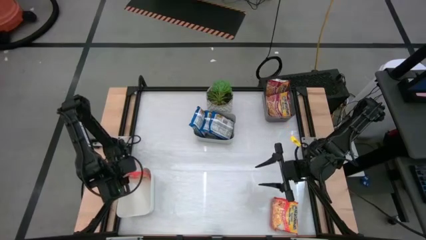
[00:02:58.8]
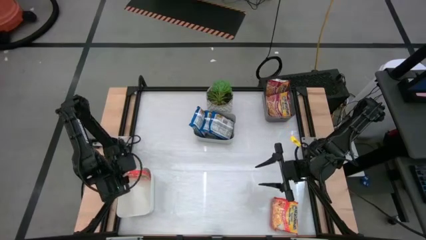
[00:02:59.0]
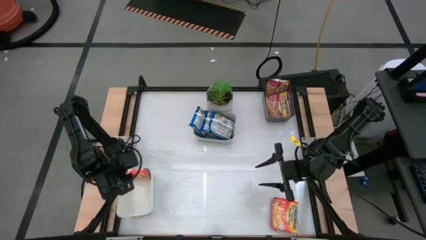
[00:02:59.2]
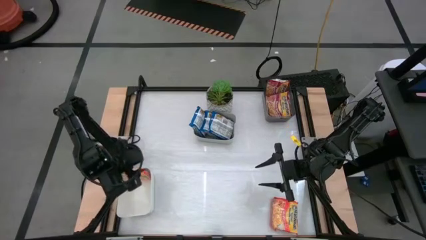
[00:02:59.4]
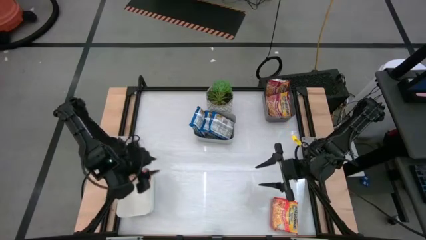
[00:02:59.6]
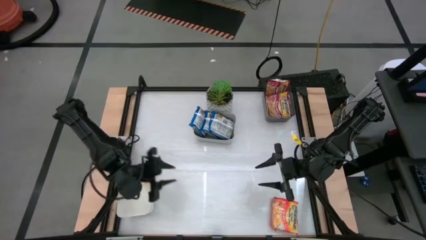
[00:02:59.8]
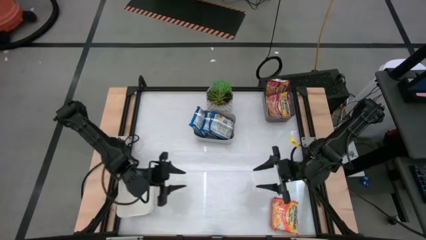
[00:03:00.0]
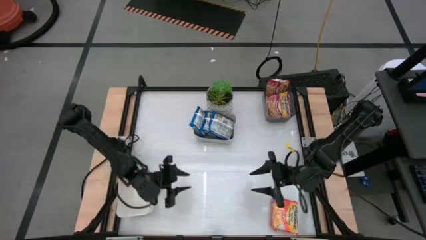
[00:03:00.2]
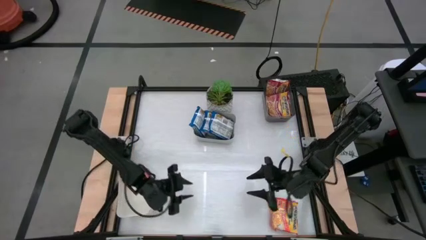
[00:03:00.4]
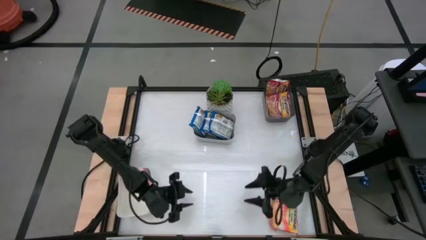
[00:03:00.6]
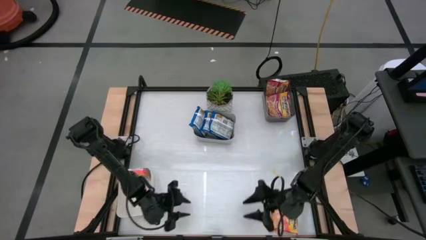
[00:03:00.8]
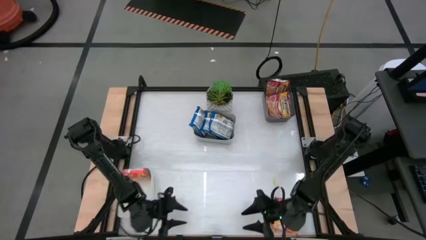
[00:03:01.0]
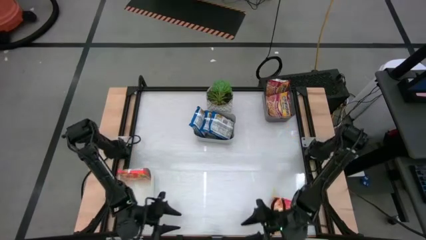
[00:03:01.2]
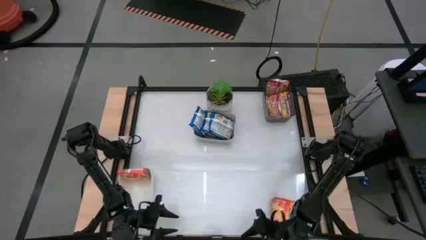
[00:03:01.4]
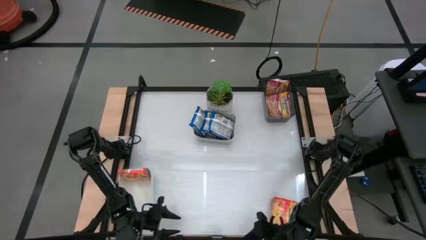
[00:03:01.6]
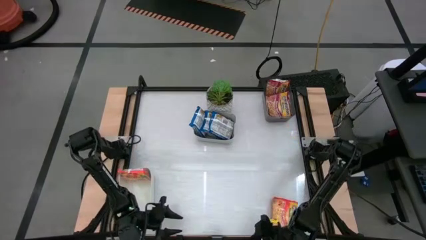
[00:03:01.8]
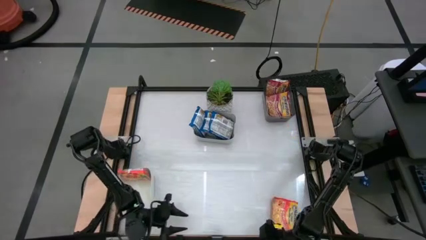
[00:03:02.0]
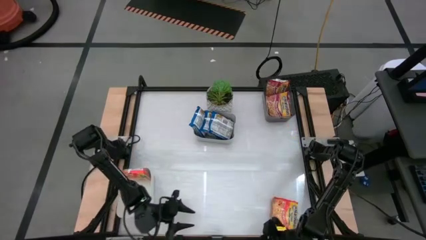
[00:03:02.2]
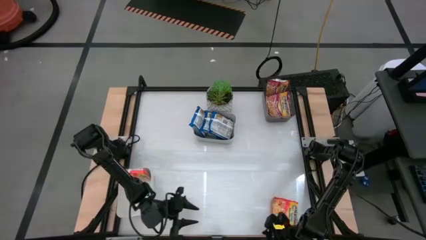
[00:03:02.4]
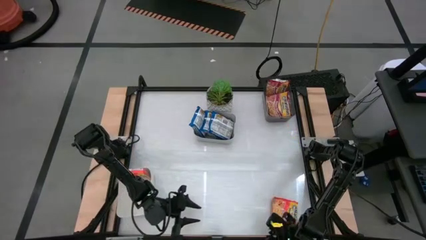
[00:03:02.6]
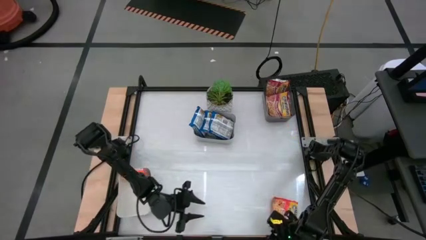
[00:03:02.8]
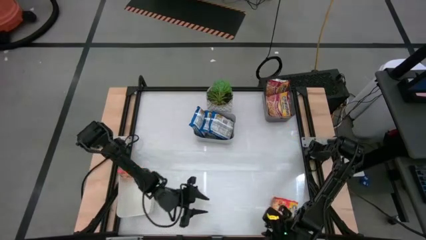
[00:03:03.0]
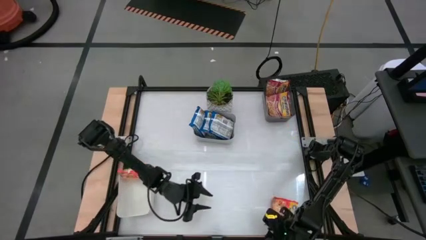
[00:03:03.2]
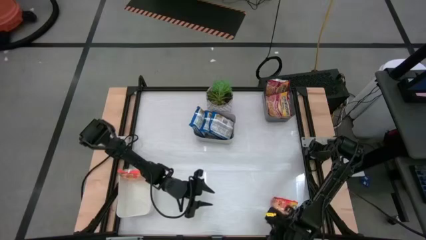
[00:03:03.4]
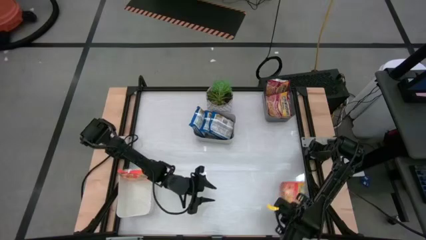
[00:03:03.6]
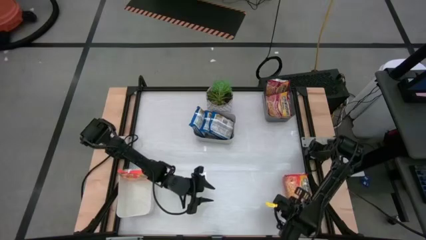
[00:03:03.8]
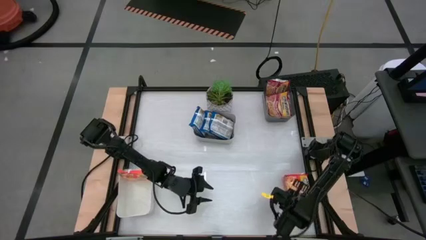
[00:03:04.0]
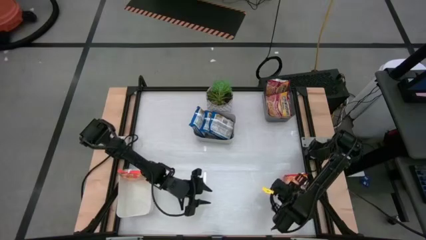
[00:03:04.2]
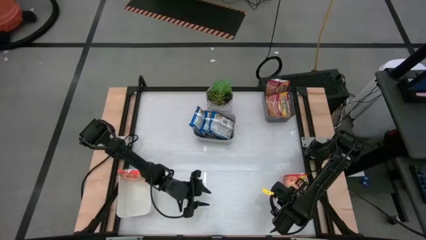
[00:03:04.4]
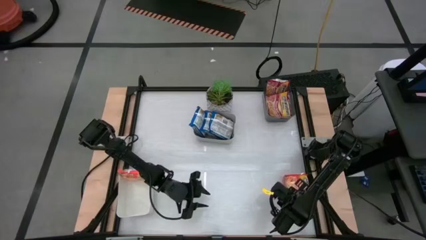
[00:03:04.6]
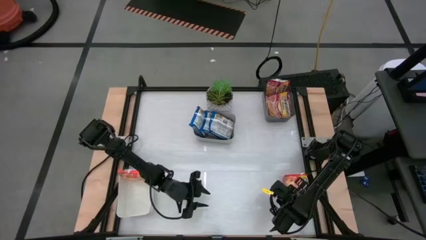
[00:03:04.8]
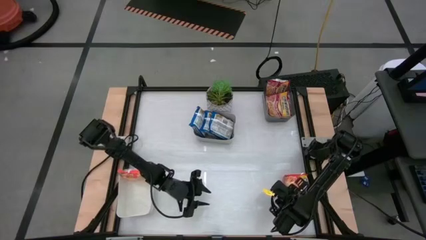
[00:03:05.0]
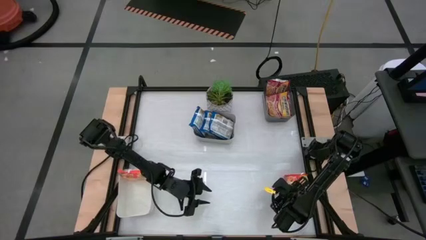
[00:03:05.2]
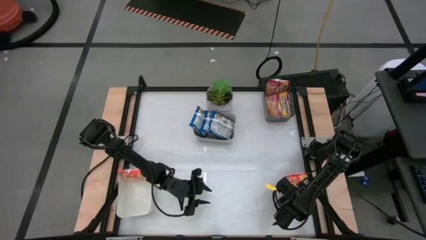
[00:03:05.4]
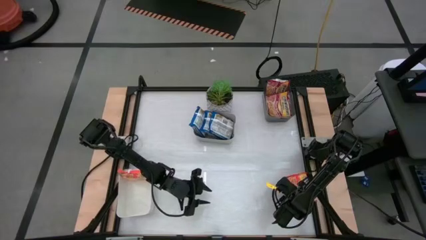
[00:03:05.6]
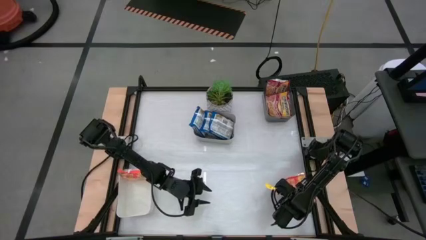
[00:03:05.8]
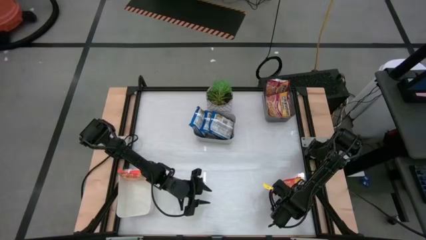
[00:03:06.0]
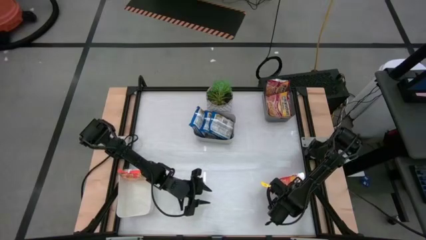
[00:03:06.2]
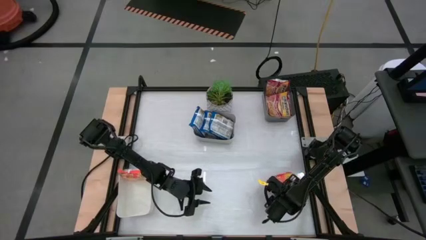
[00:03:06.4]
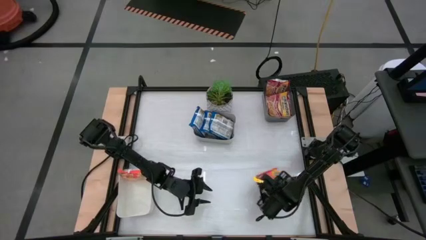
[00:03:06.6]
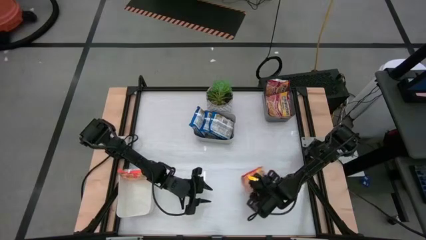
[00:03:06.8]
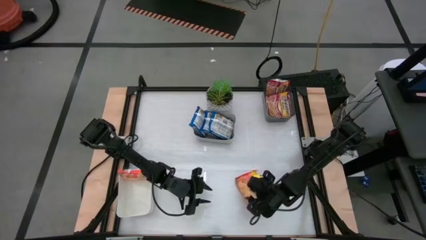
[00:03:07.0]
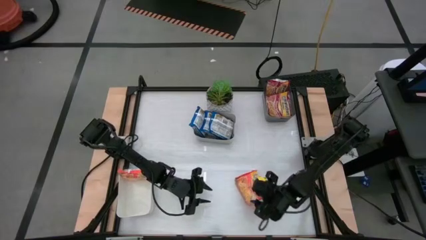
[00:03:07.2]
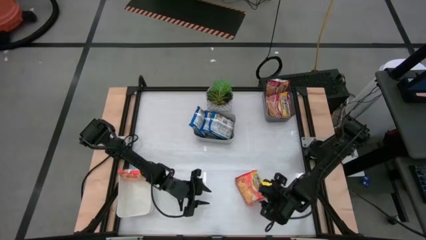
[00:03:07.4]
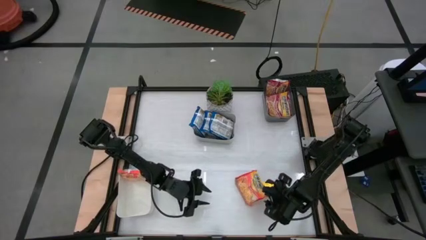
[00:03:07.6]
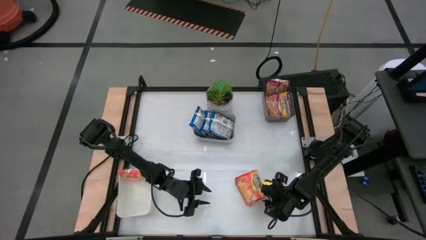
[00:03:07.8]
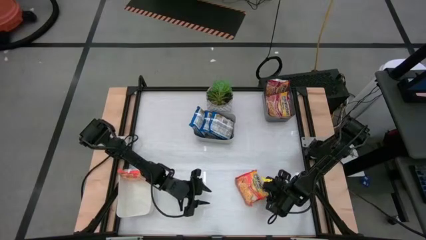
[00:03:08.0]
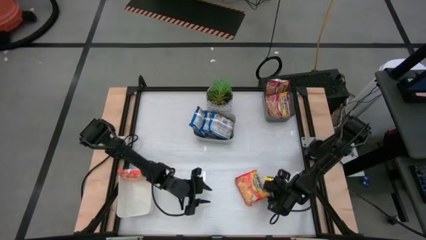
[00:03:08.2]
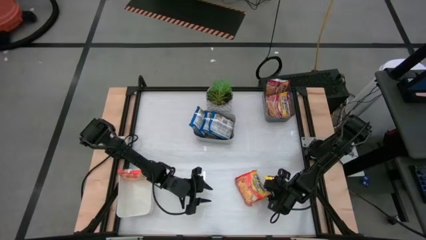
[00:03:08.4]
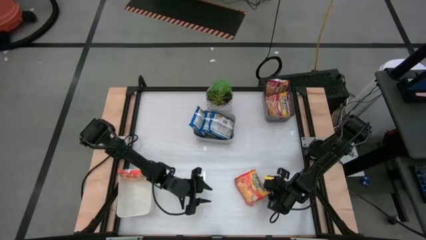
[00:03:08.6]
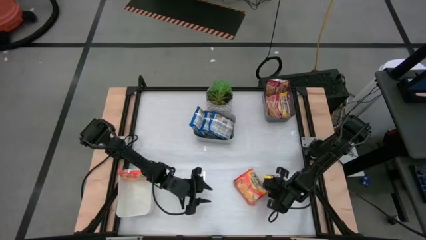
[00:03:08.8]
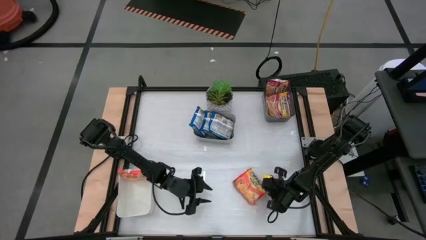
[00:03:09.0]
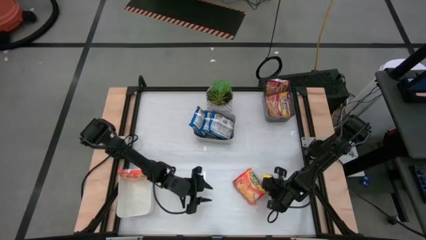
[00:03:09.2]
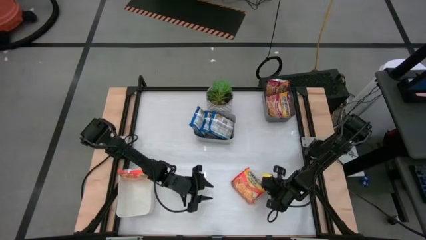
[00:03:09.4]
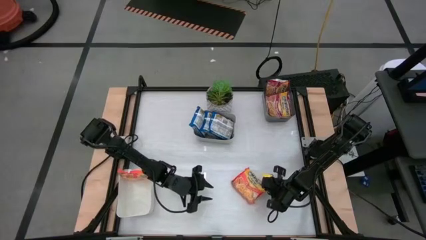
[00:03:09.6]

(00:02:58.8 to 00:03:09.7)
Task: Sort Maruchan noodles
Put the orange noodle pack into the white bin

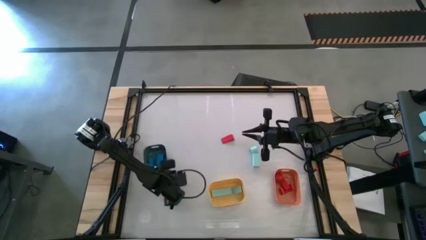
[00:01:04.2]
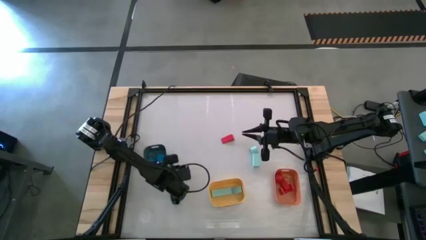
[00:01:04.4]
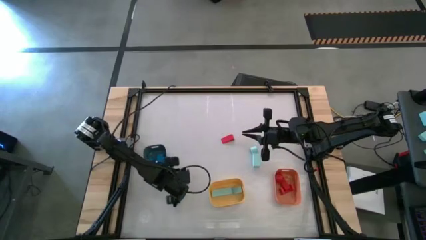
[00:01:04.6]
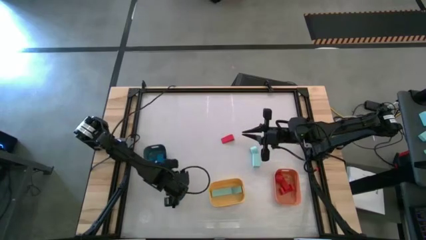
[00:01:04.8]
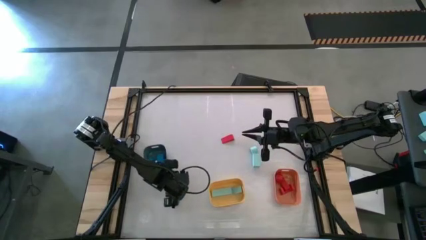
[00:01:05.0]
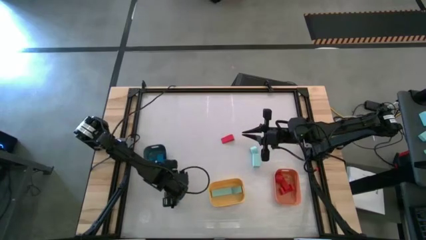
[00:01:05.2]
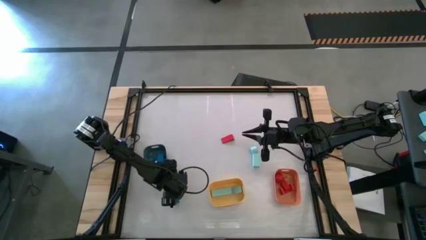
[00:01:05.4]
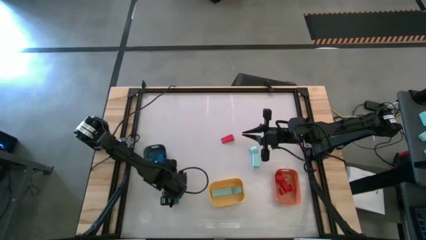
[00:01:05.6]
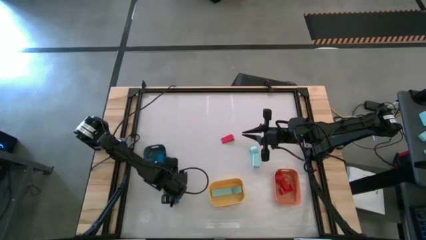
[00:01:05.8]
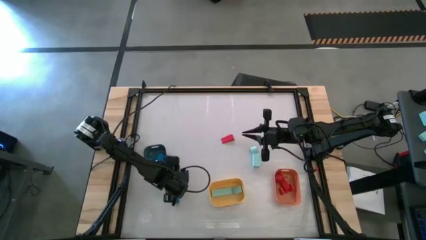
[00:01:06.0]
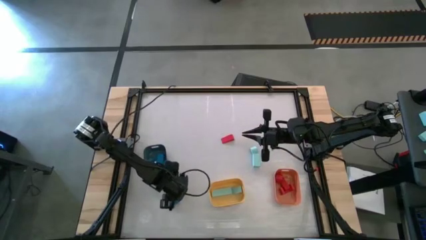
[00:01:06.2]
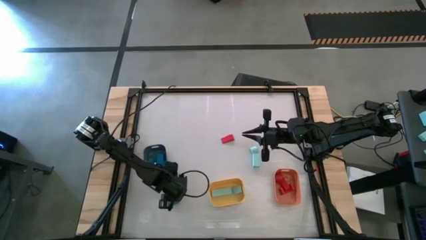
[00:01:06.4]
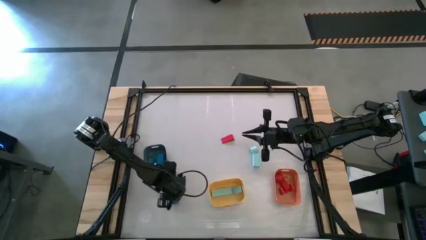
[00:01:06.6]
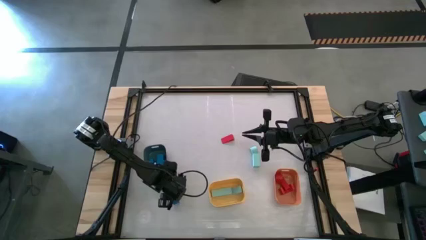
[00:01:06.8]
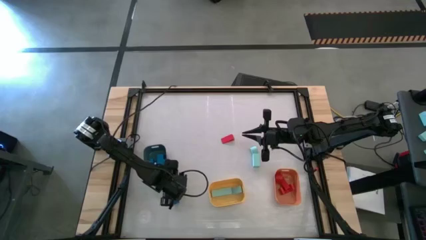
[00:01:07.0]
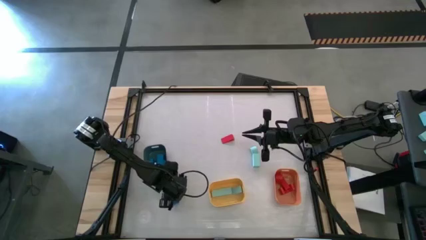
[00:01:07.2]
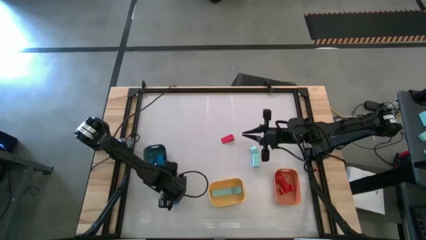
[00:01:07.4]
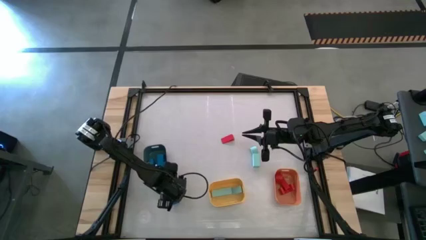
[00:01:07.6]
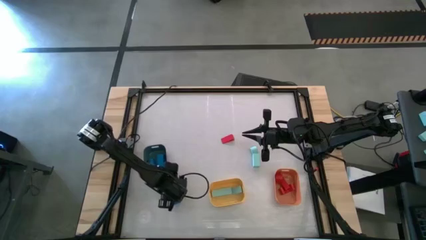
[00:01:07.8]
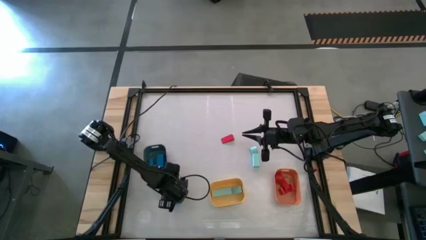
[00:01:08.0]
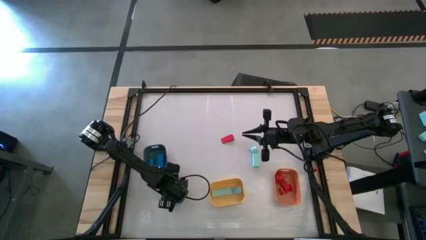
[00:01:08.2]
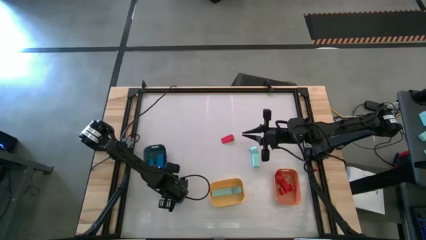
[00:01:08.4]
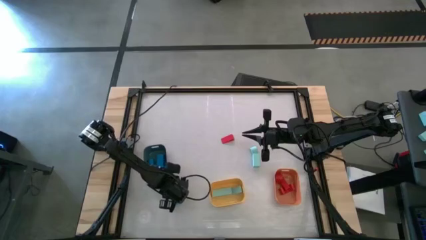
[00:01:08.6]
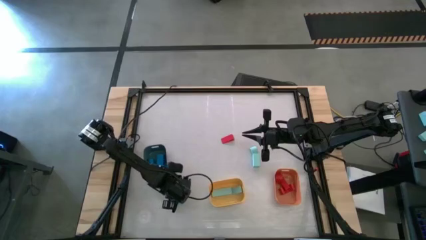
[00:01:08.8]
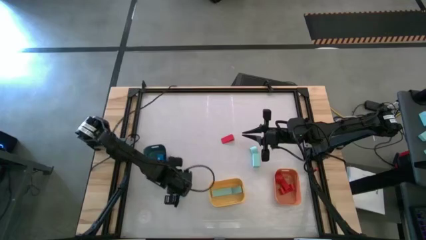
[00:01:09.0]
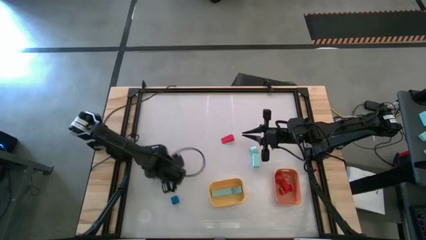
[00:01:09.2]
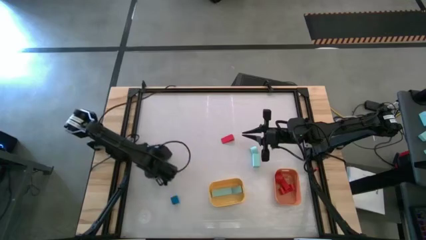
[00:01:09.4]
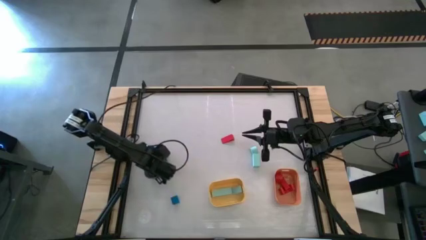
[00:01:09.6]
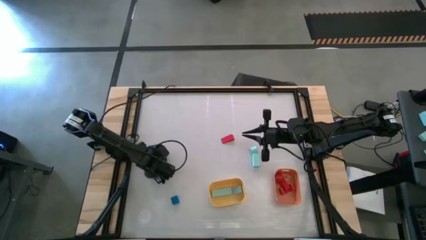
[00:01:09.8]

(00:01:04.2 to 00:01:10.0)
Task: Sort & place blocks by color
Put the blue block into the blue bin
